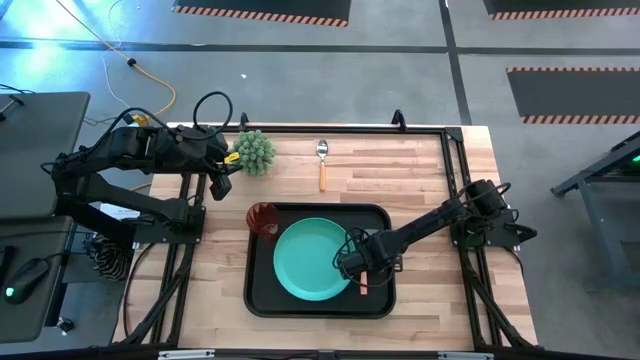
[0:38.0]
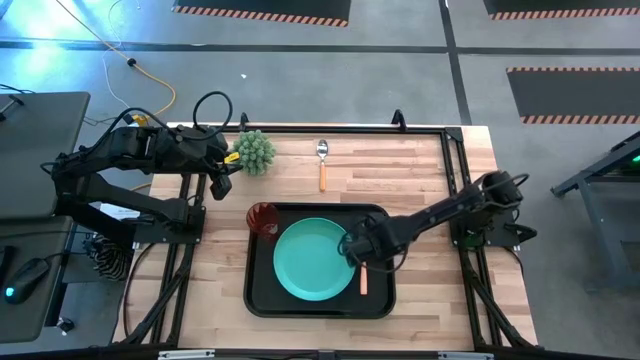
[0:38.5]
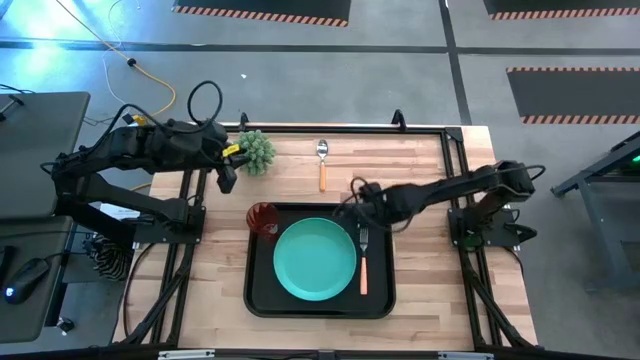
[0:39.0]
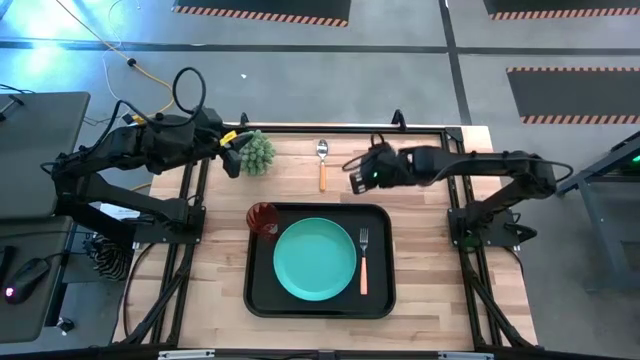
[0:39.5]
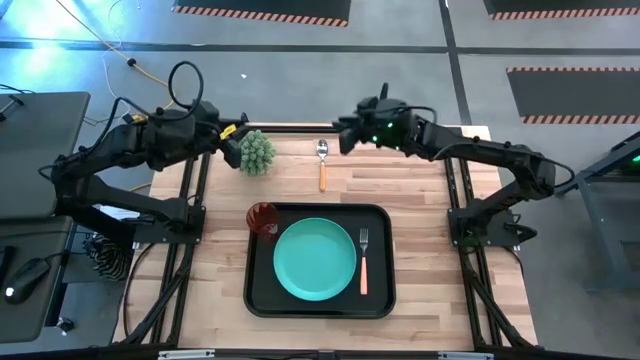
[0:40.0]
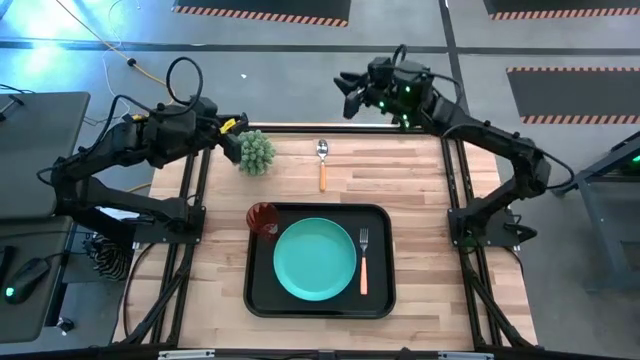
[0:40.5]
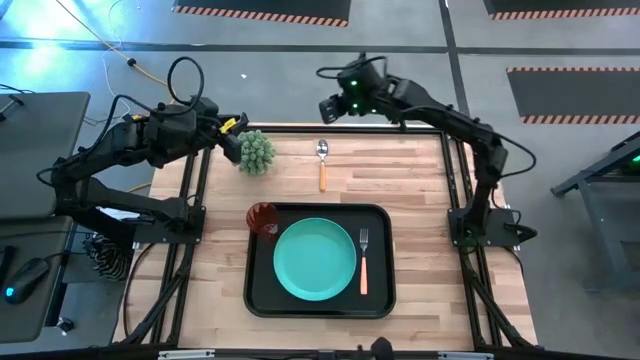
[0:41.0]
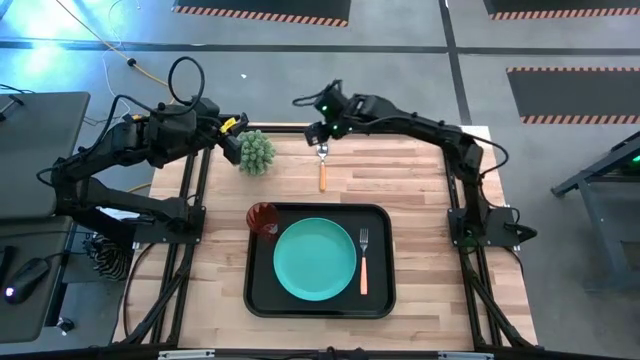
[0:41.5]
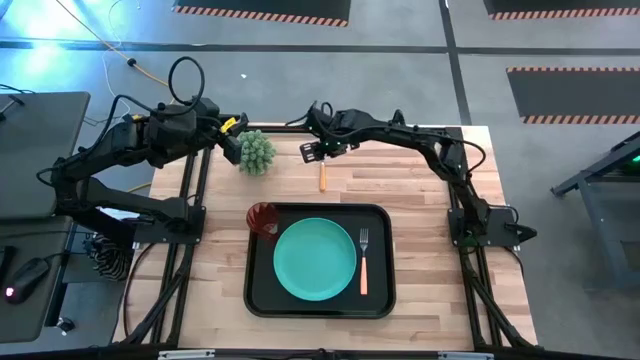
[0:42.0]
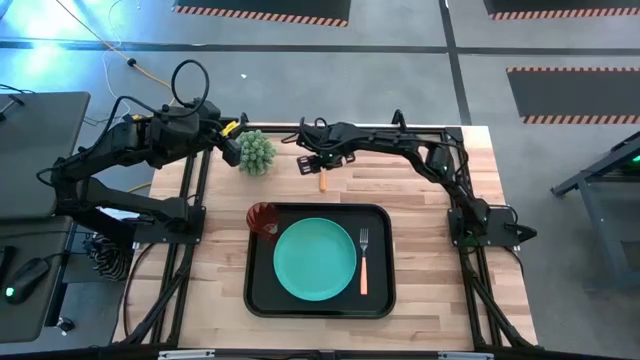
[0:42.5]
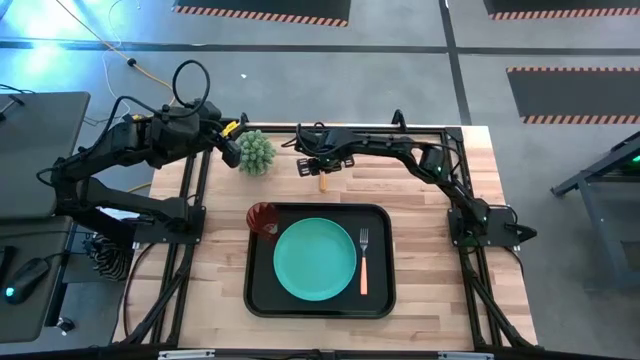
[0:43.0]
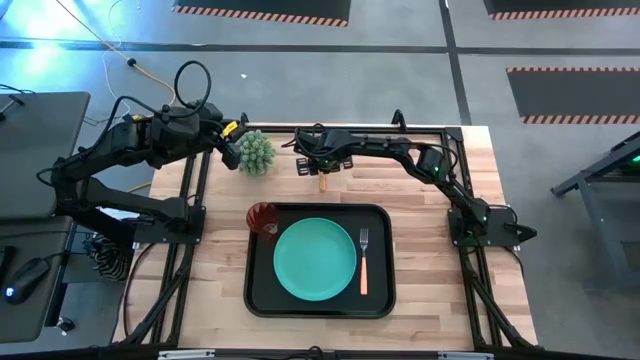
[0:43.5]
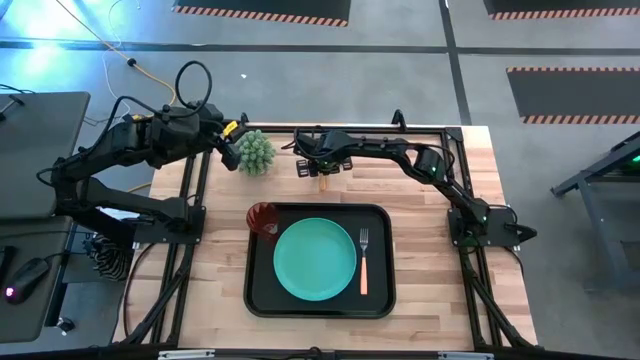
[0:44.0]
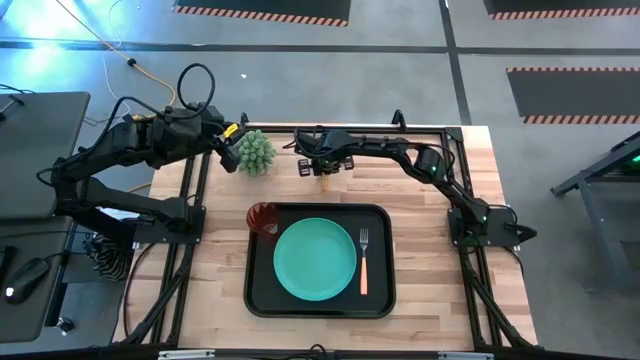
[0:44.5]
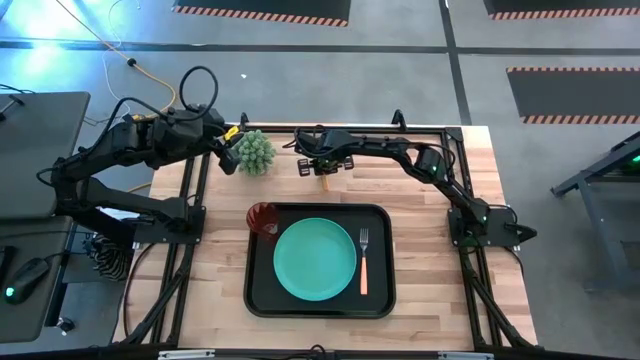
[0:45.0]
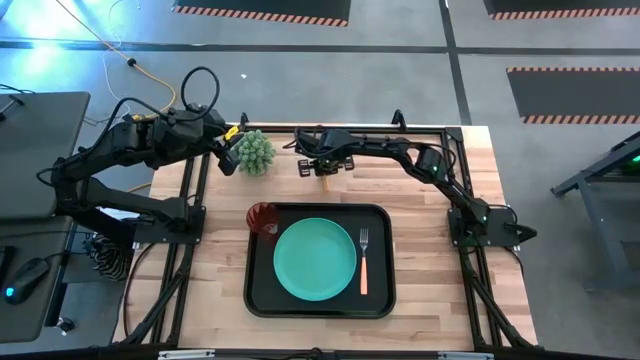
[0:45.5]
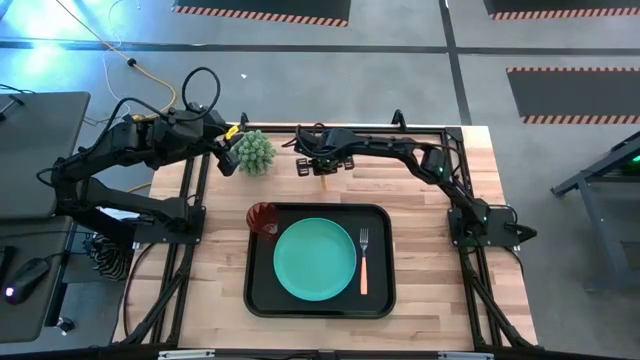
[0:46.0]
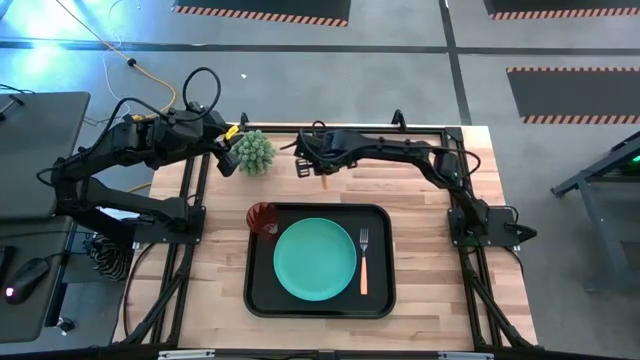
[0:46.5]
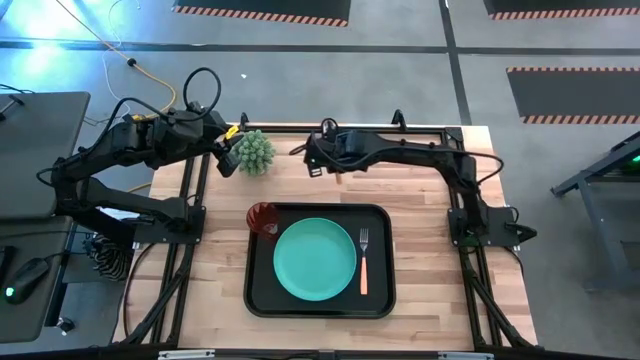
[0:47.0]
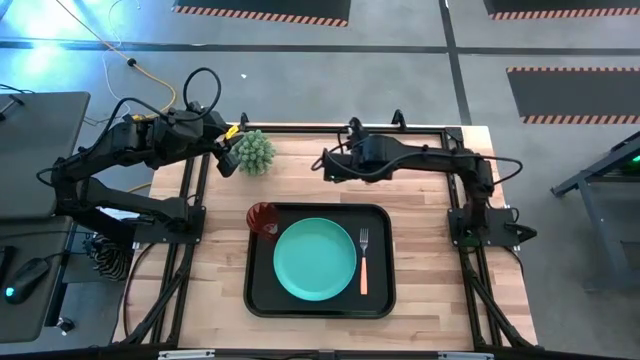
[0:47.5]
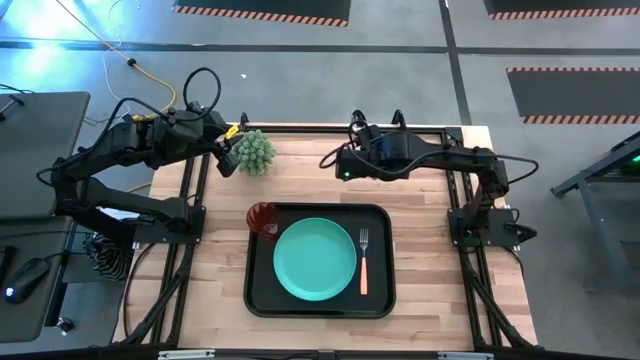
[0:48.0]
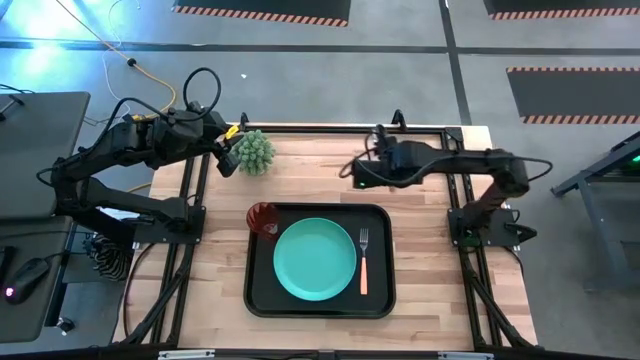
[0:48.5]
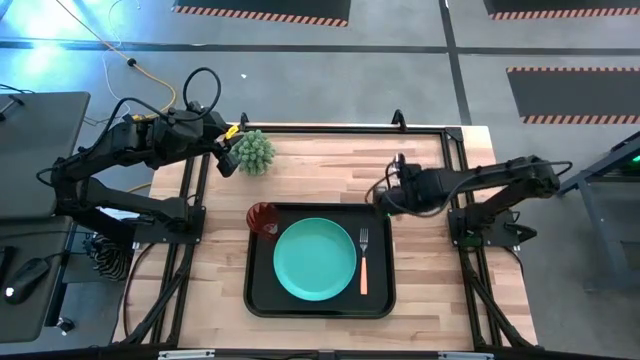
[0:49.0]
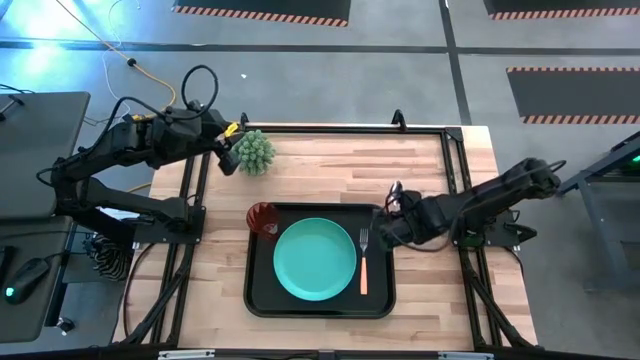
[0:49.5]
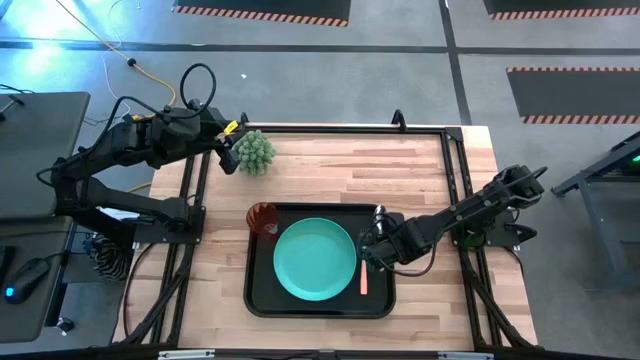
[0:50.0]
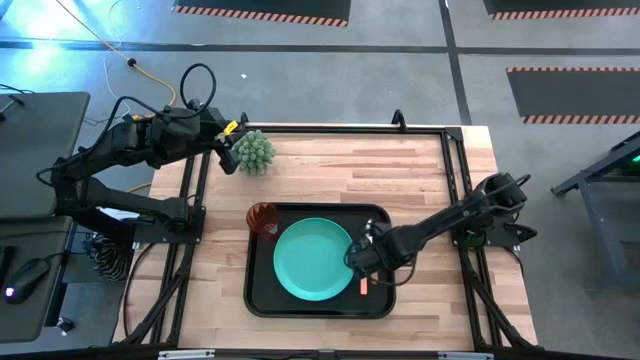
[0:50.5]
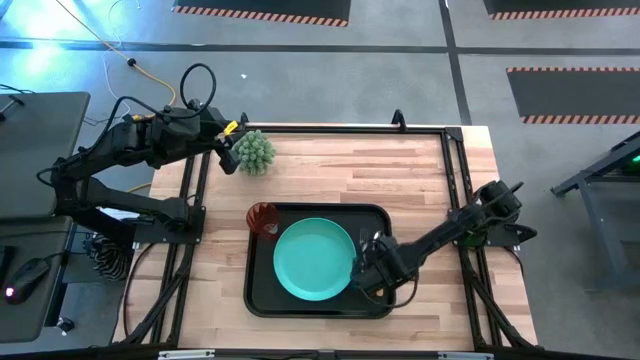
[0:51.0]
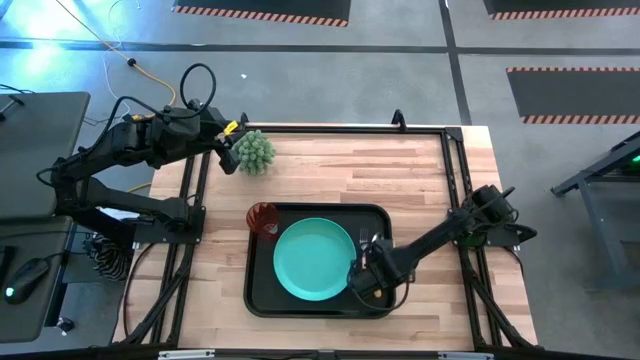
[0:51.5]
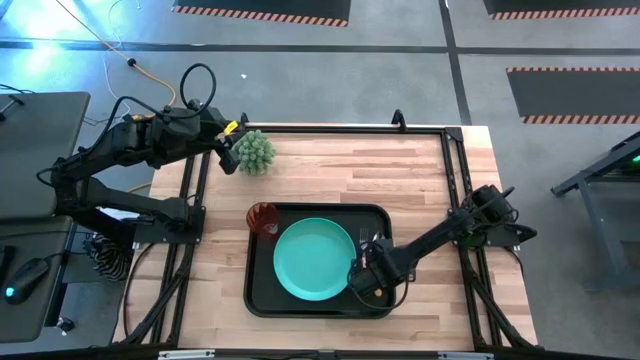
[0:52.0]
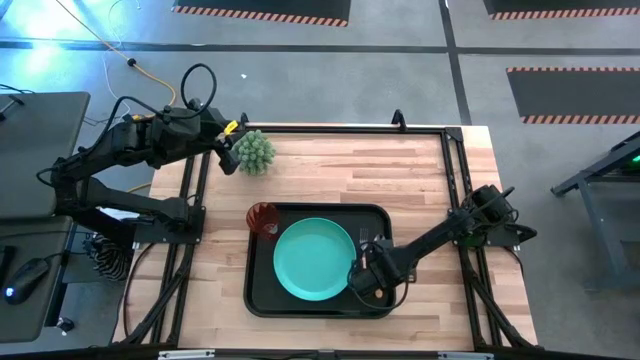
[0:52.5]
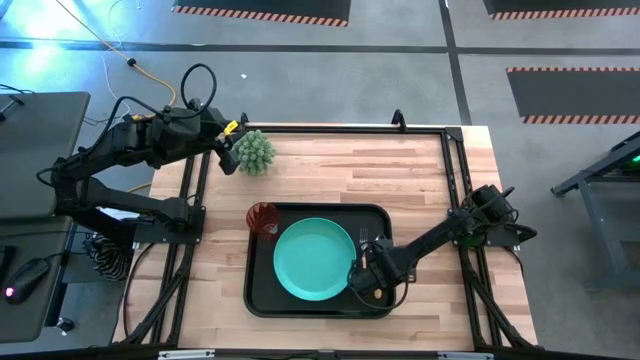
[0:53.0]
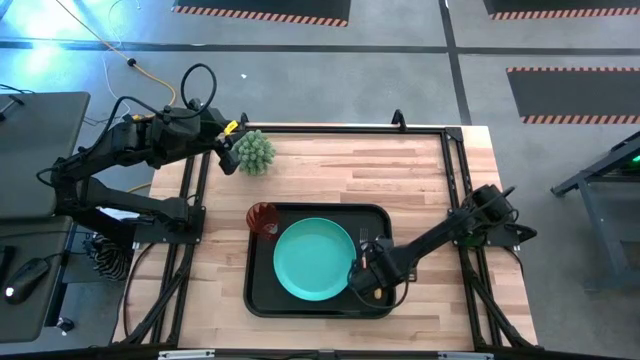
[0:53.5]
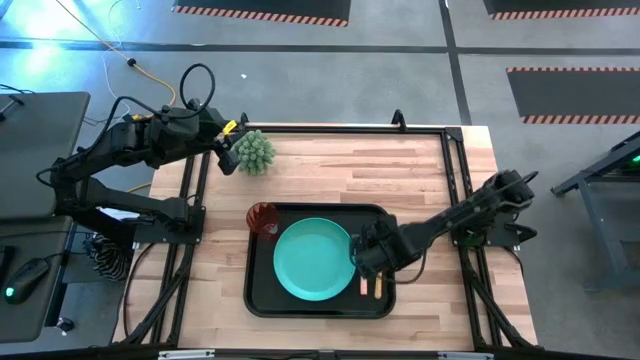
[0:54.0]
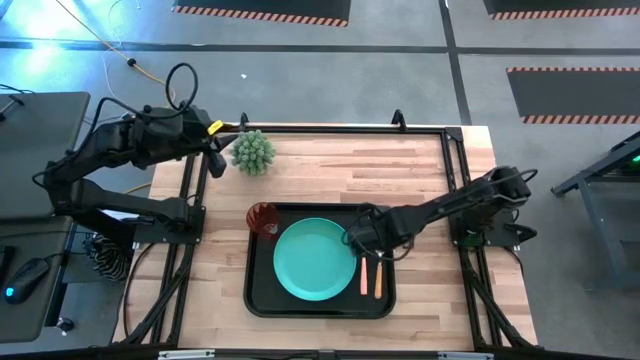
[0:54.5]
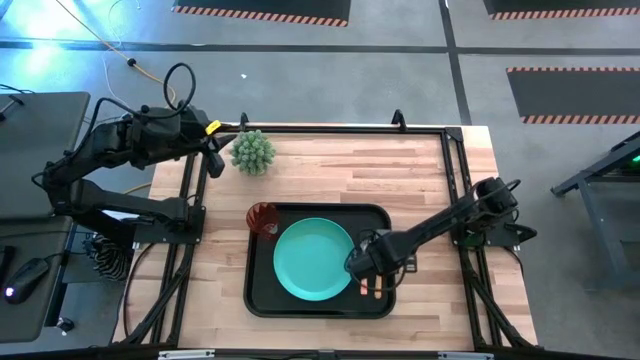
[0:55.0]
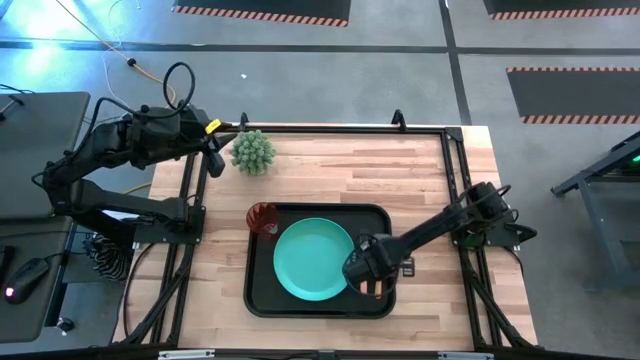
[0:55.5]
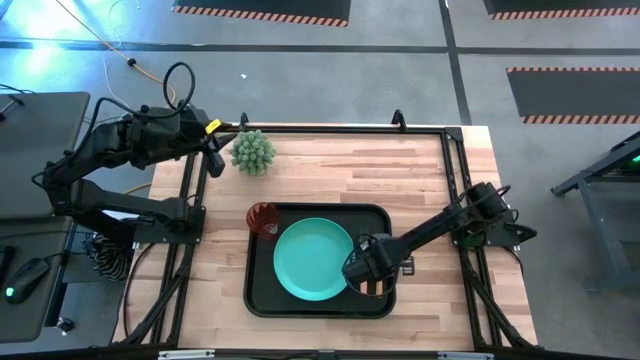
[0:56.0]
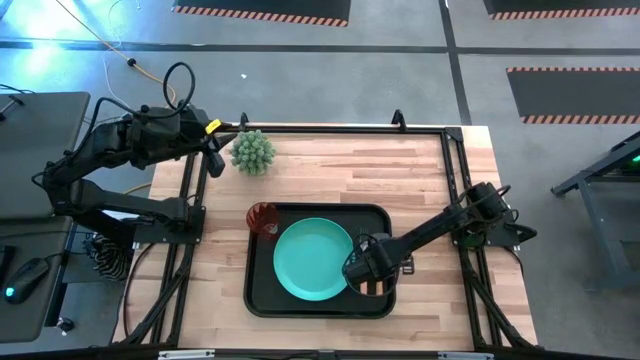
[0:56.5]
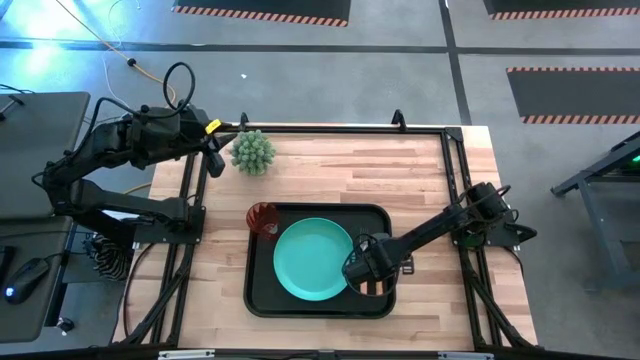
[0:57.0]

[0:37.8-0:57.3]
Task: Pick and place plate/cup/fork/spoon on tray
Put the orange spoon on the black tray to the right of the orange fork

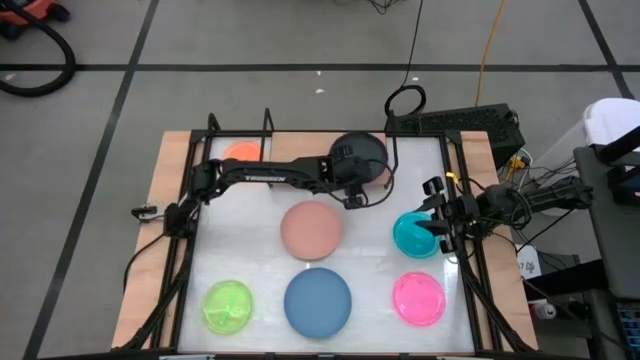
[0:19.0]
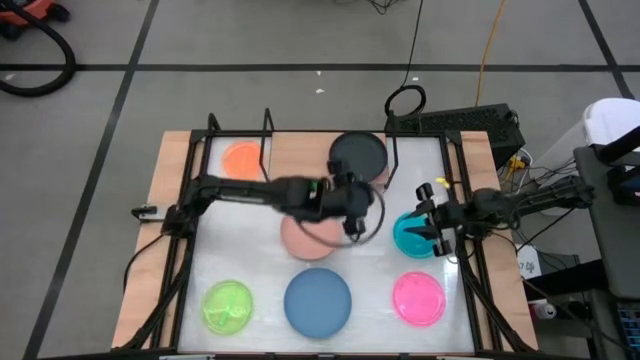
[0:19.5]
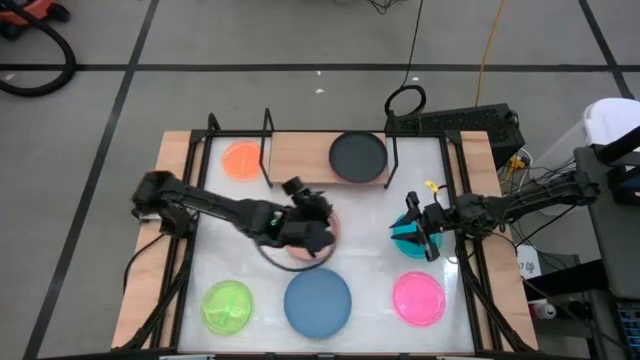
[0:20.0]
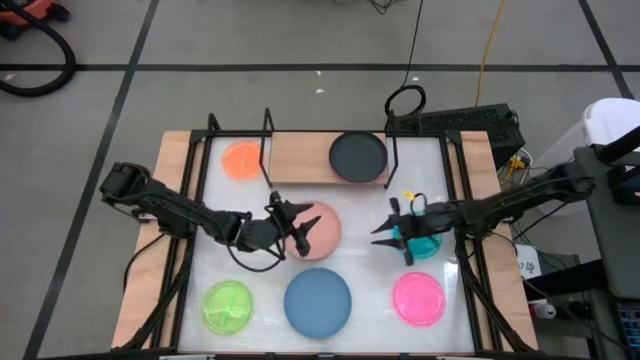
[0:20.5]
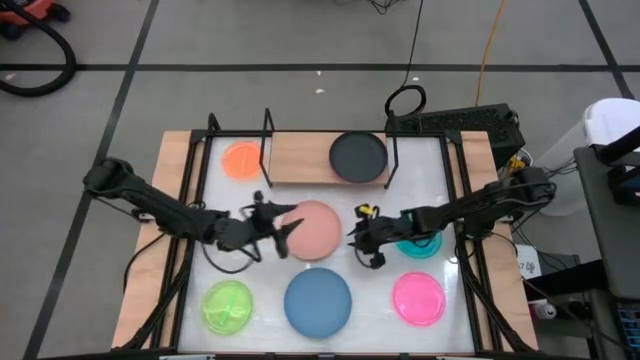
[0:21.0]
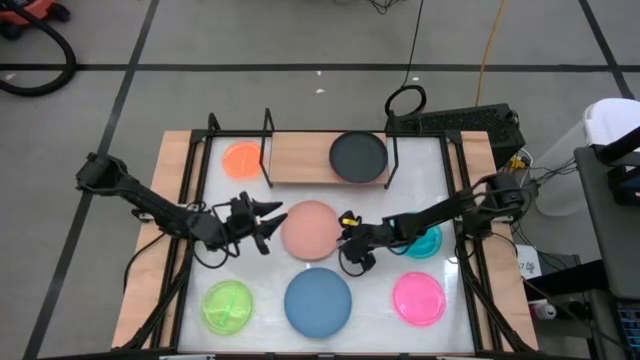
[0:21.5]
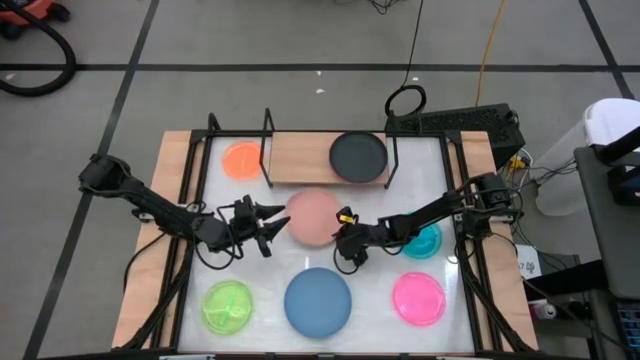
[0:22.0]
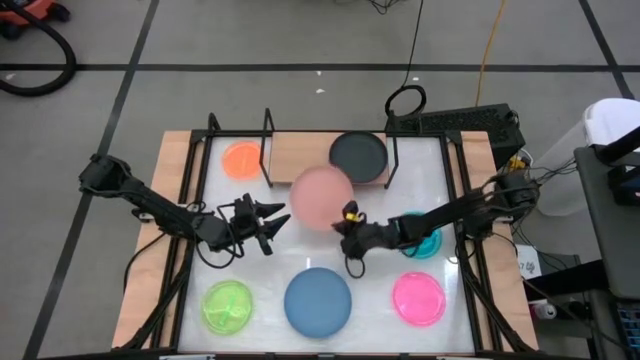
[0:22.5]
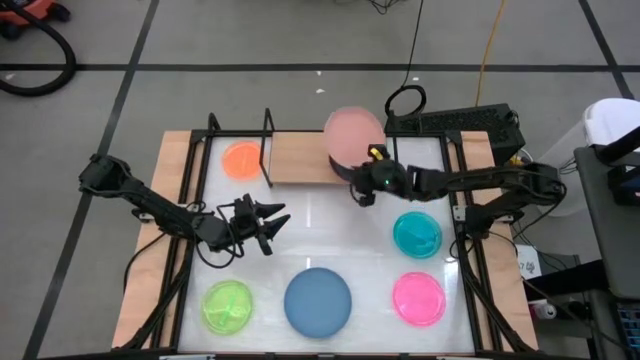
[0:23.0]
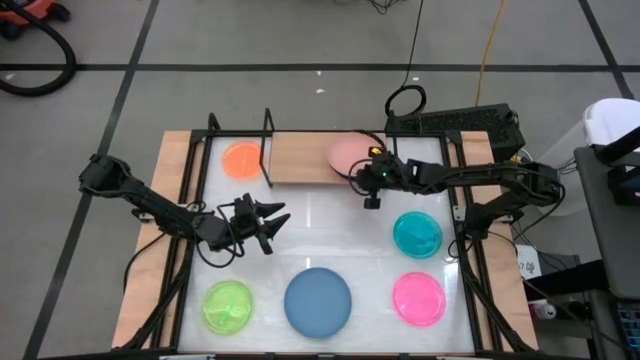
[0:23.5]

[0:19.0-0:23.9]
Task: Place and stack plates onto a shelf
Stack the orange plate on the black plate
